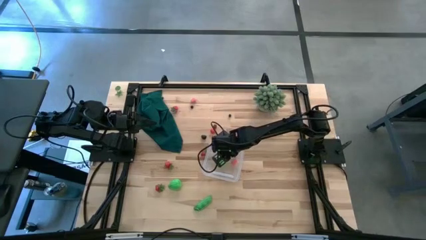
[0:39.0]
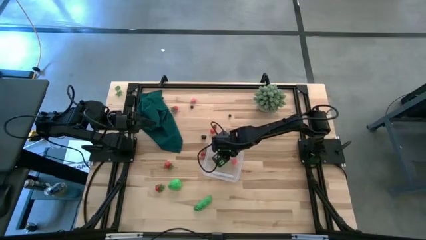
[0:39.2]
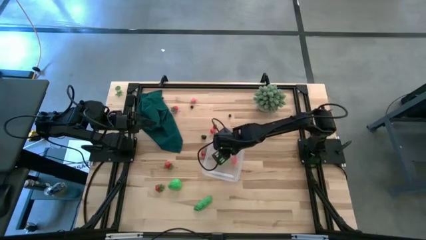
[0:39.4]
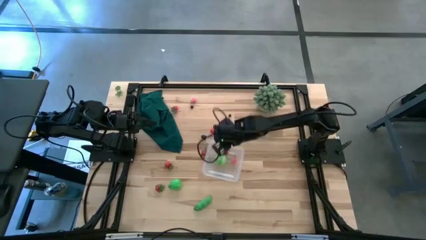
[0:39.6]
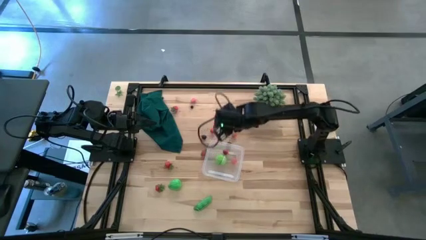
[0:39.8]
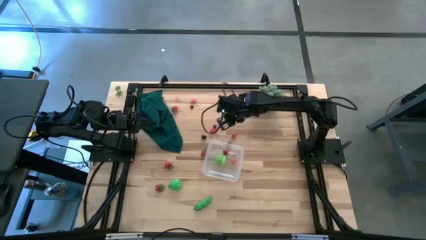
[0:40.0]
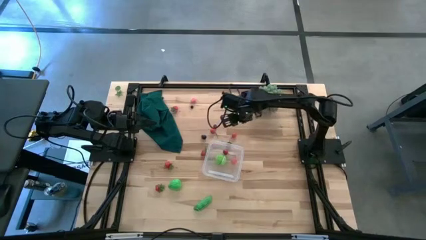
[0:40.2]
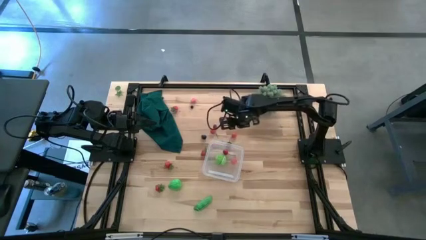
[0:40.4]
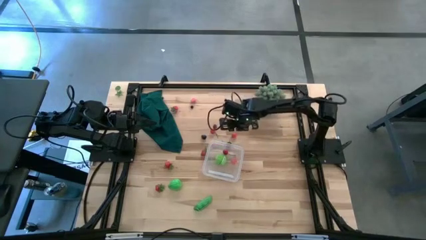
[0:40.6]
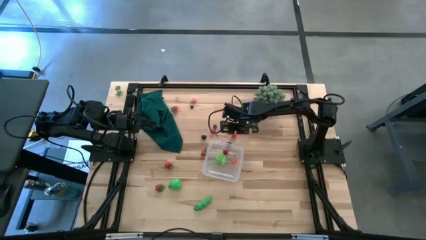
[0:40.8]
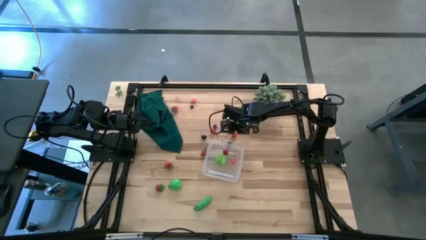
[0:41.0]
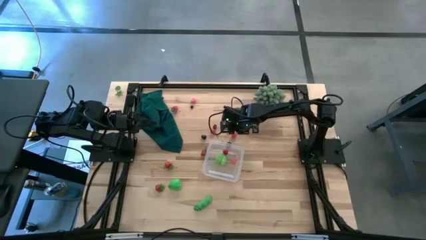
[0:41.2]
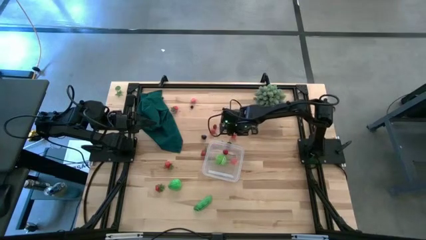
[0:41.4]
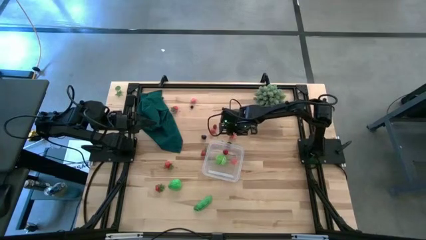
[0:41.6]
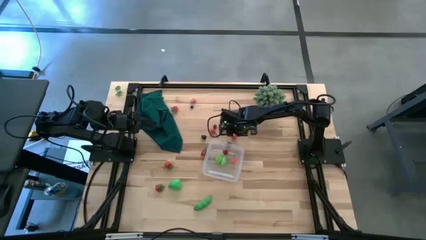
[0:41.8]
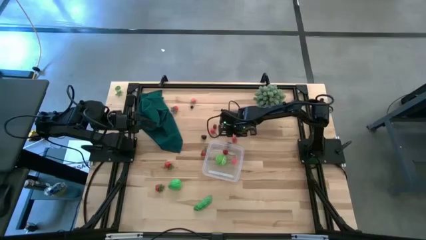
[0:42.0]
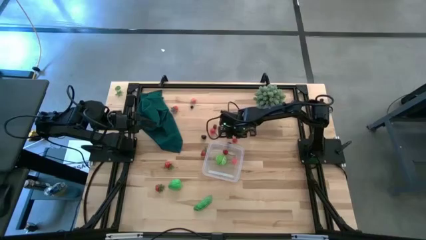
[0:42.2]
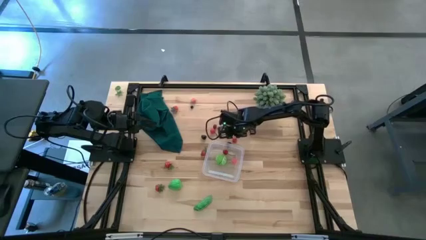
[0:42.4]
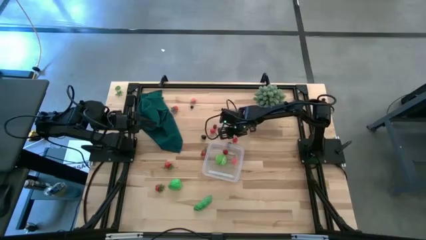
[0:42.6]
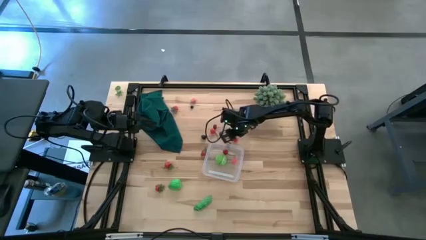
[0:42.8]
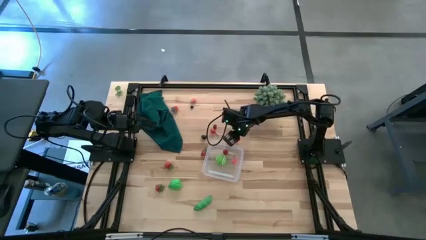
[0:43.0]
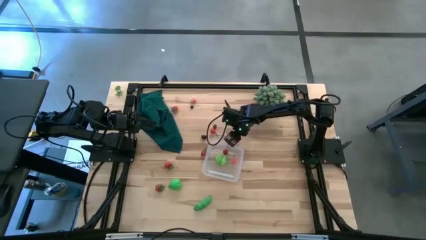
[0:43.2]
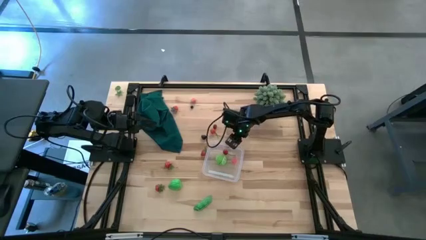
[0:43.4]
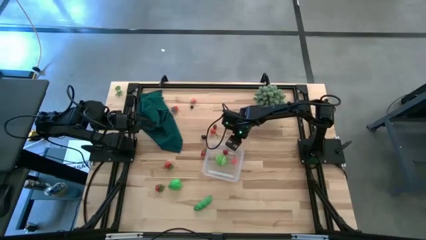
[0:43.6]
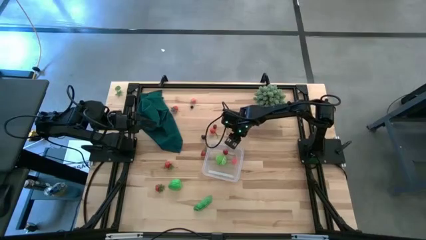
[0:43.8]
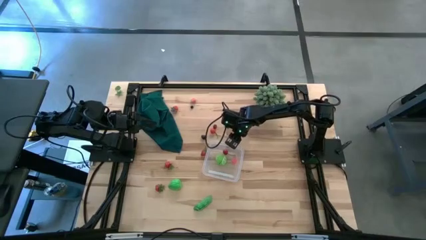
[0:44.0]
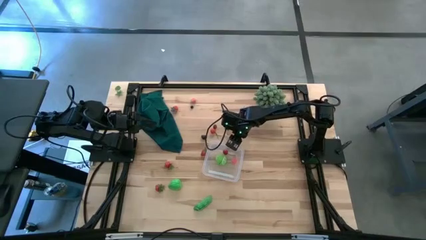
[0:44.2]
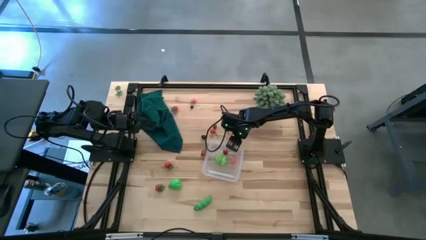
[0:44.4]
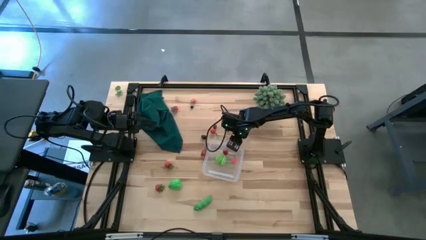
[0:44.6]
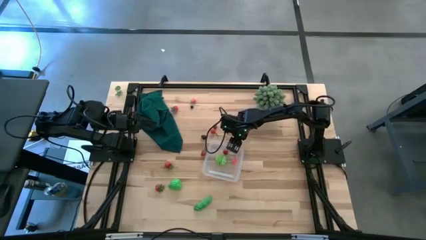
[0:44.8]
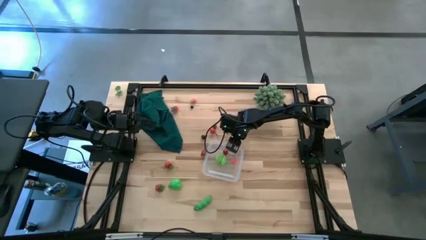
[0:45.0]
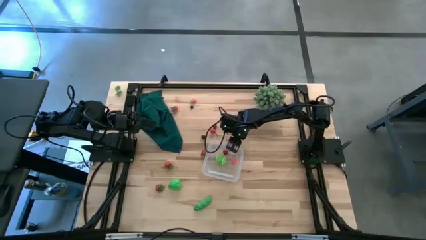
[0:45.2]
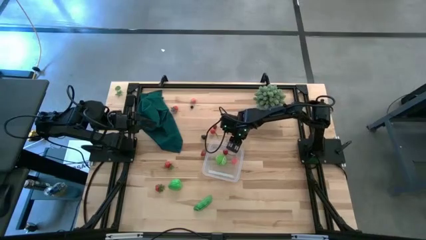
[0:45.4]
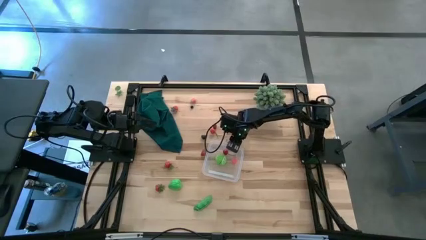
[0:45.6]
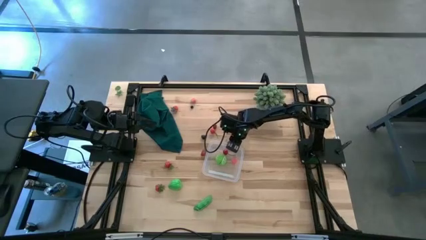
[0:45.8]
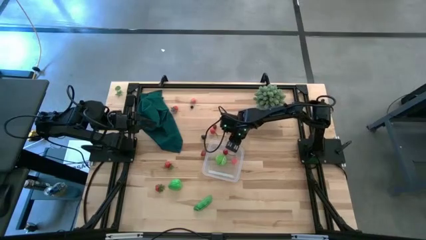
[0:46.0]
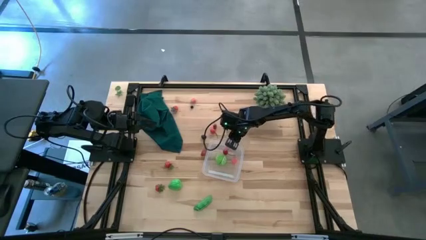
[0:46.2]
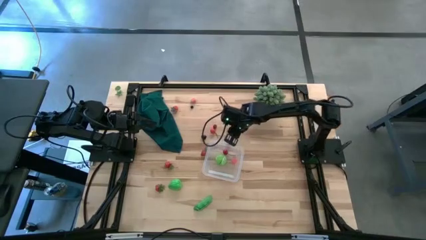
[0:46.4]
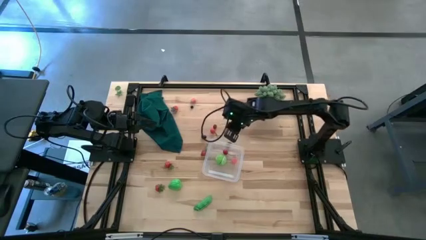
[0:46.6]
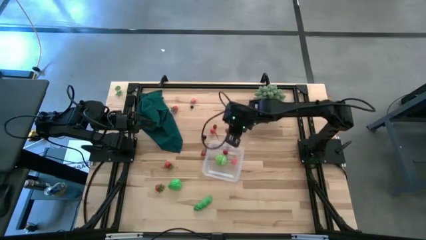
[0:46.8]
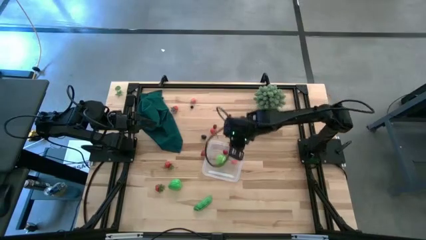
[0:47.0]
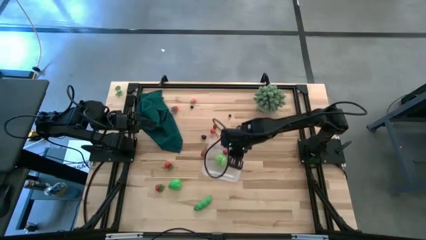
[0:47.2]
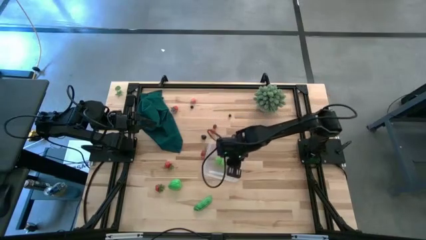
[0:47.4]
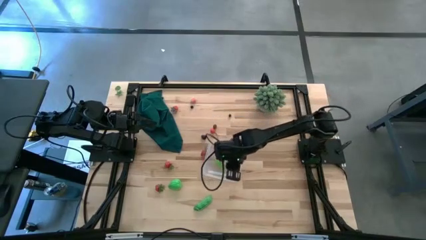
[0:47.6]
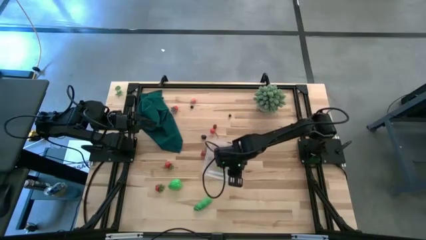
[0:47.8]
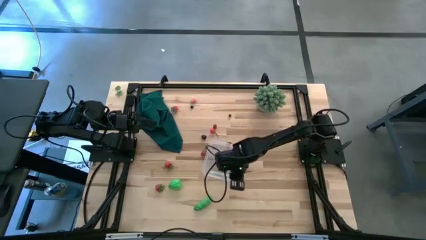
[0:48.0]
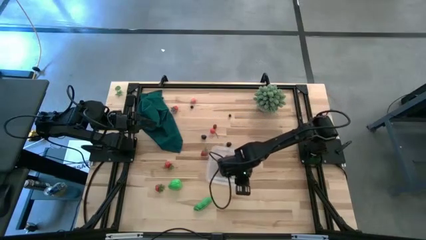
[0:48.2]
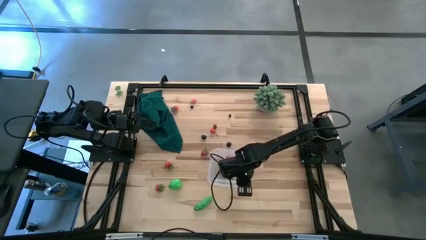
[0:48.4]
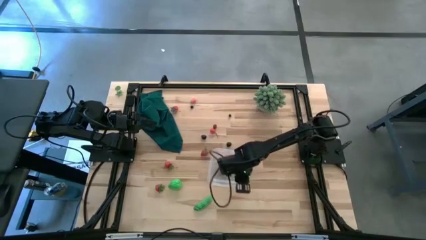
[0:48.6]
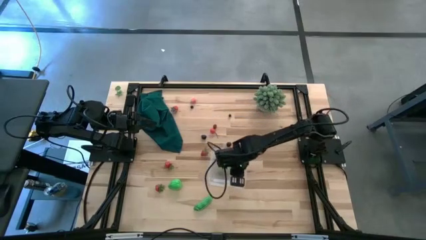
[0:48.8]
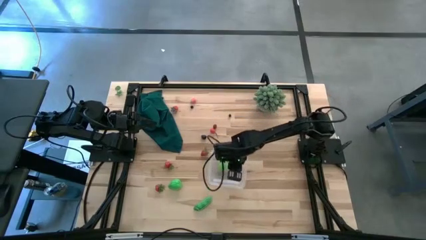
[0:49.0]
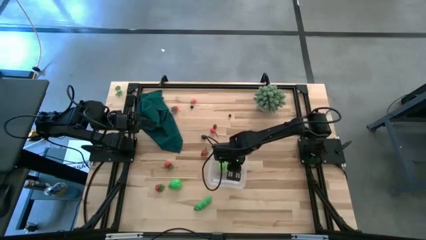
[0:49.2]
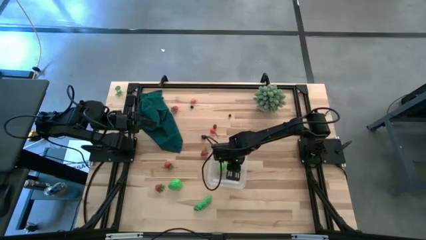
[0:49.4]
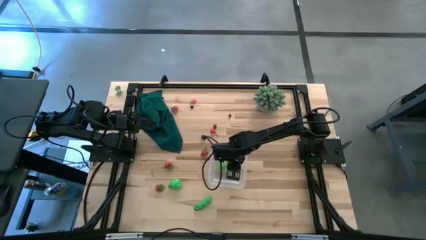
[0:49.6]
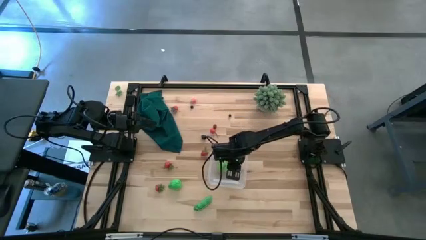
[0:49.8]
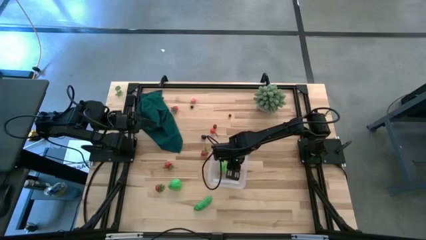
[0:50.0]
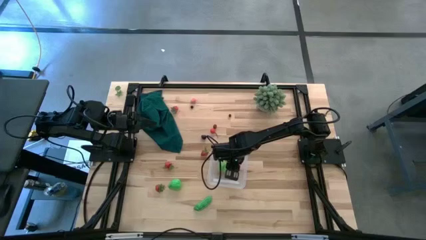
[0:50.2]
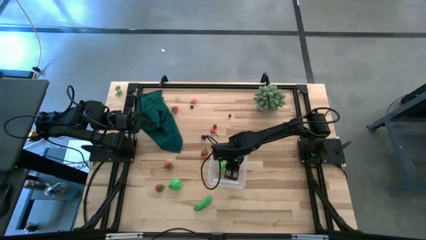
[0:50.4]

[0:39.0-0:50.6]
Task: Pick and placing Produce into tupperware
Put the right red cherry into the container
